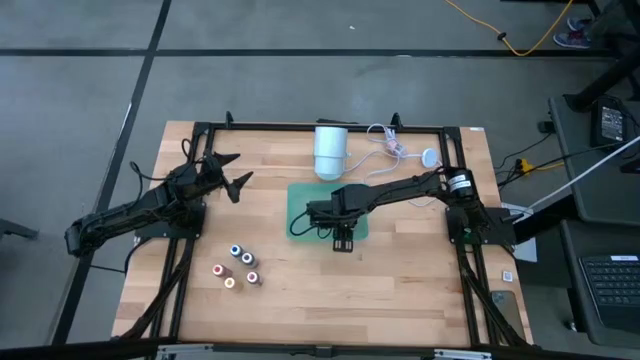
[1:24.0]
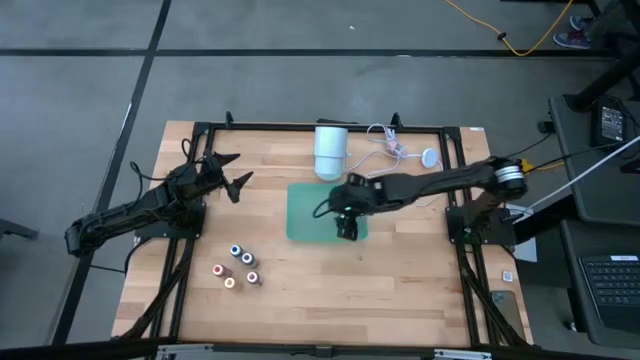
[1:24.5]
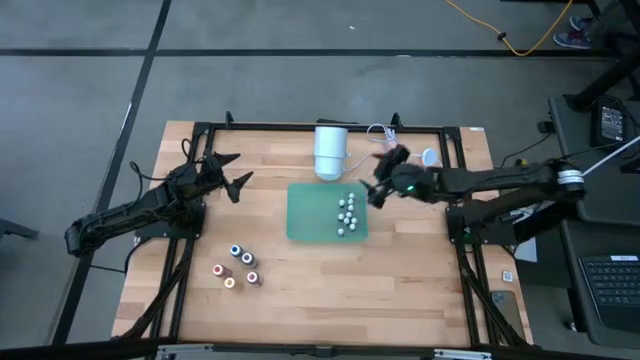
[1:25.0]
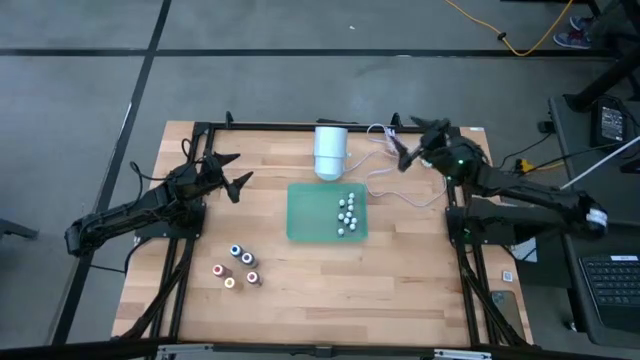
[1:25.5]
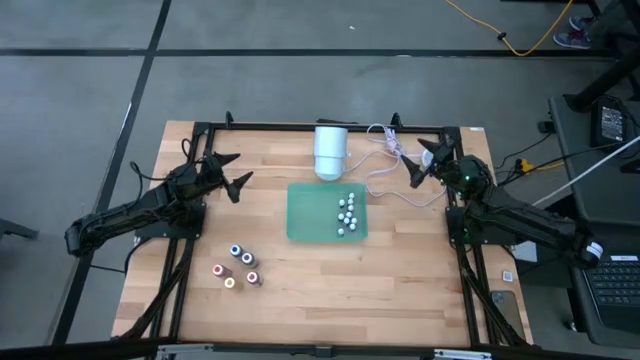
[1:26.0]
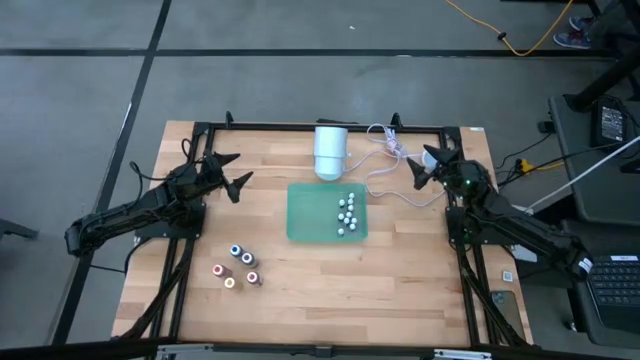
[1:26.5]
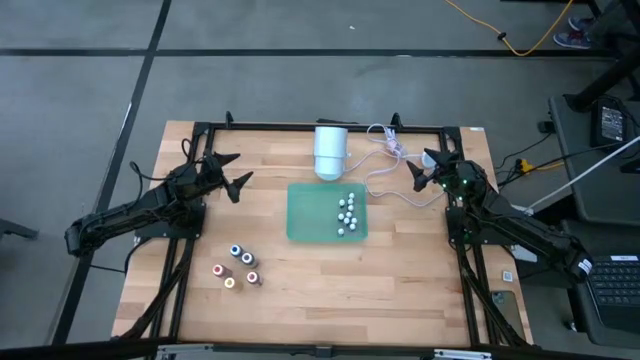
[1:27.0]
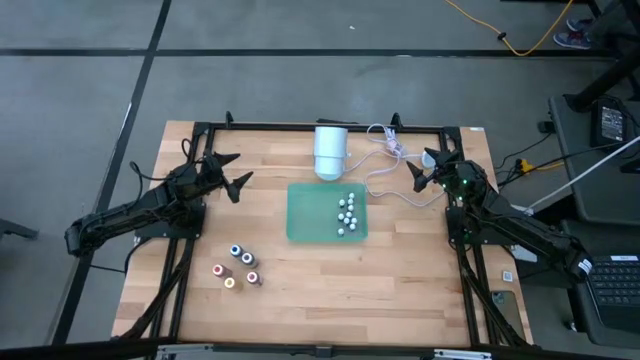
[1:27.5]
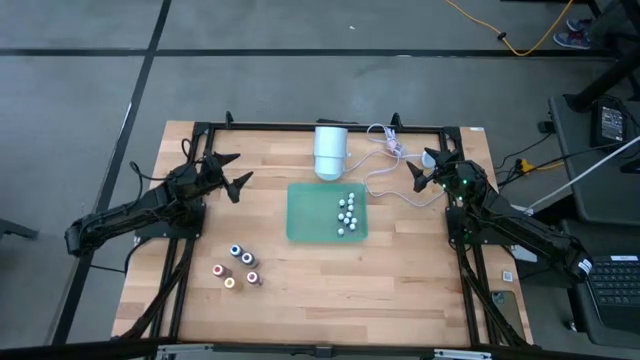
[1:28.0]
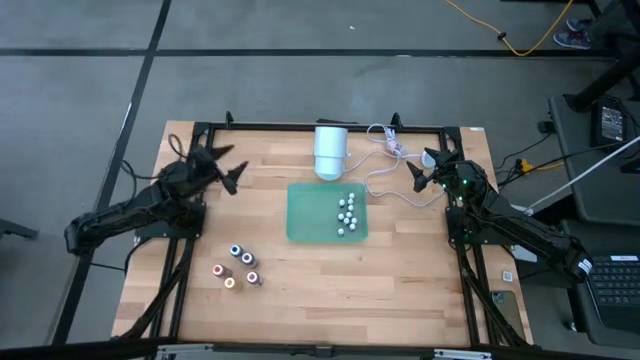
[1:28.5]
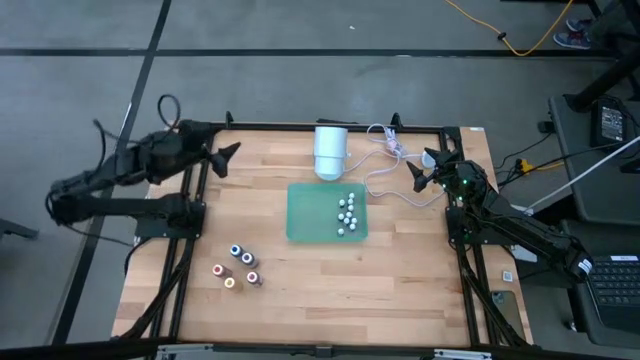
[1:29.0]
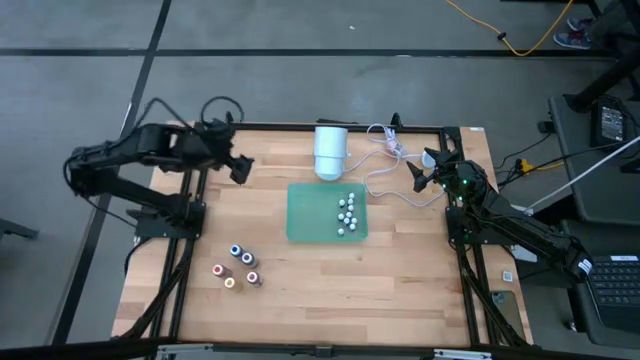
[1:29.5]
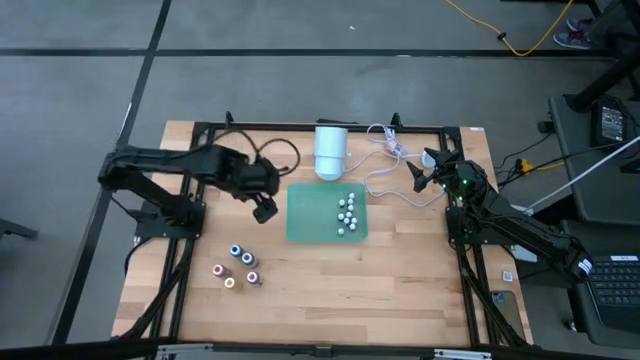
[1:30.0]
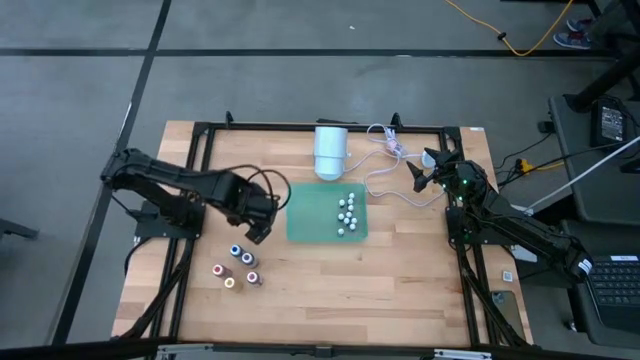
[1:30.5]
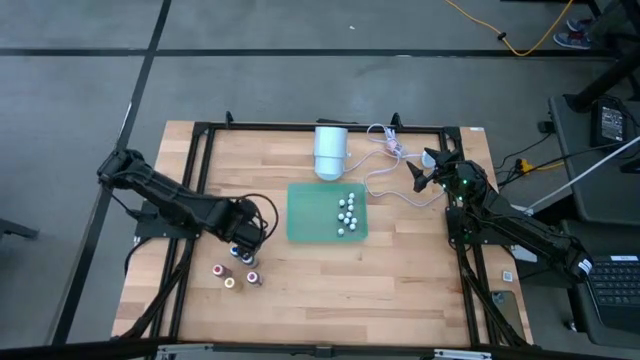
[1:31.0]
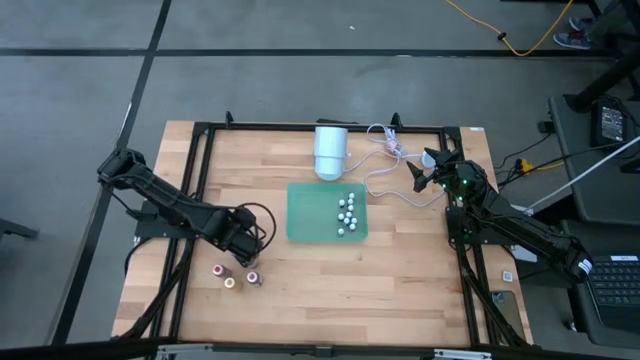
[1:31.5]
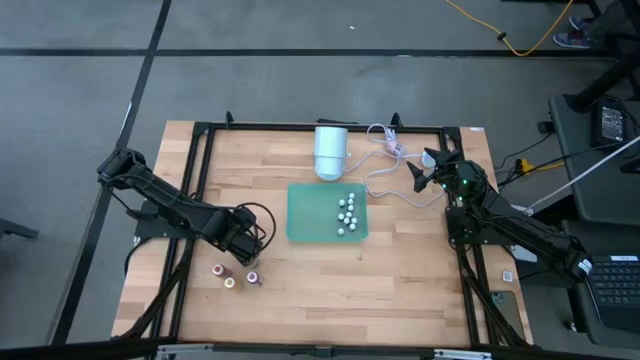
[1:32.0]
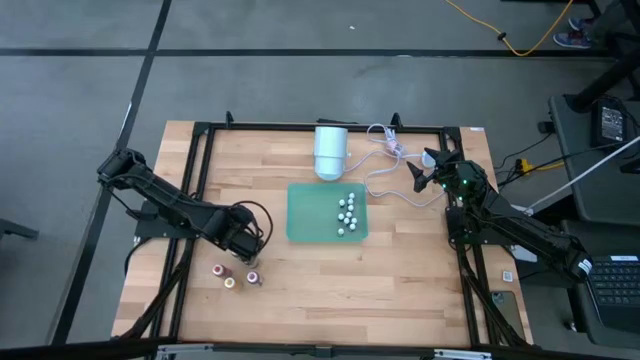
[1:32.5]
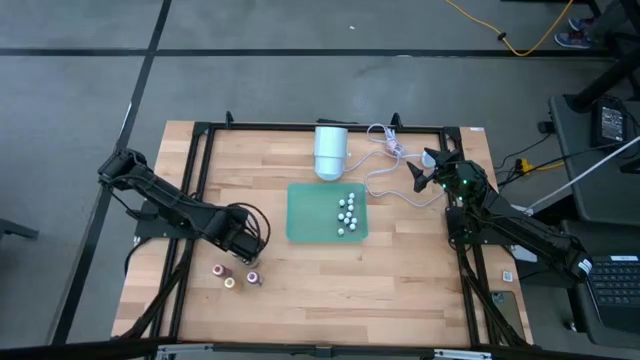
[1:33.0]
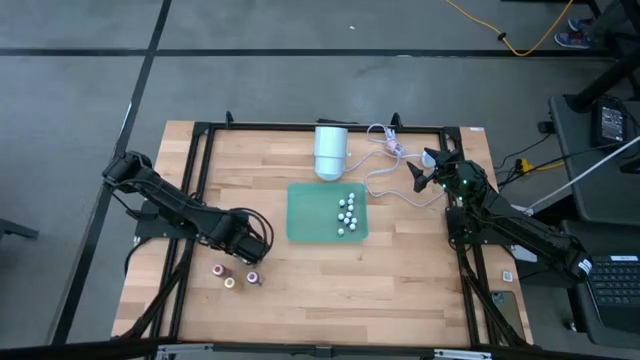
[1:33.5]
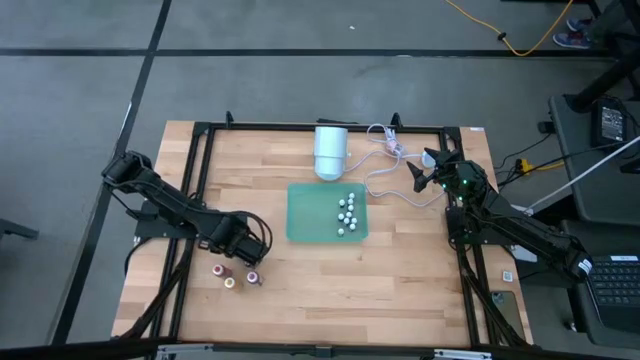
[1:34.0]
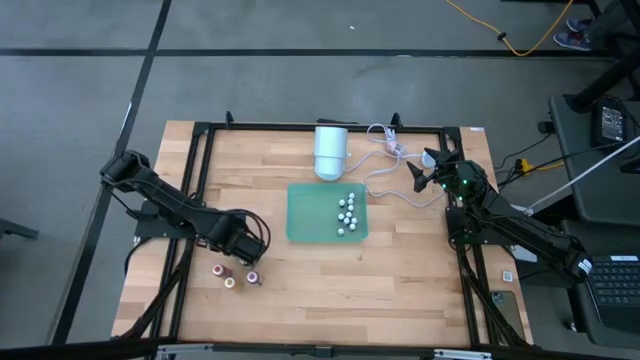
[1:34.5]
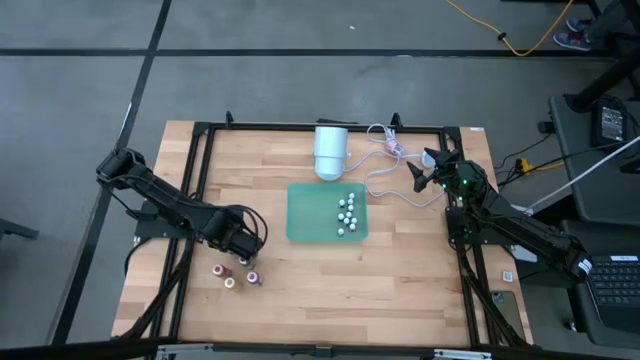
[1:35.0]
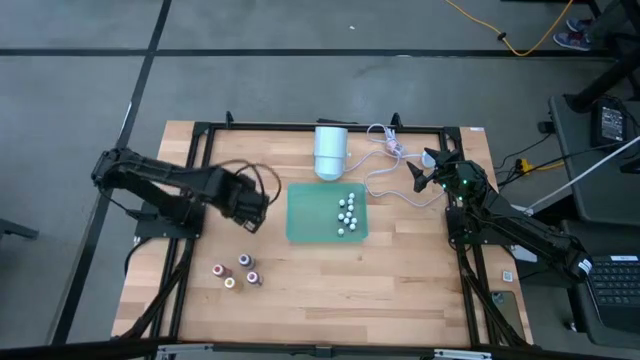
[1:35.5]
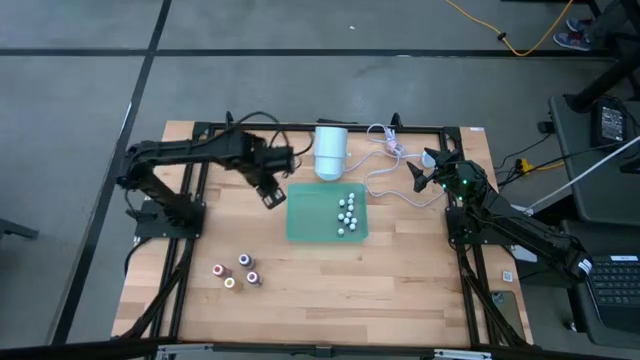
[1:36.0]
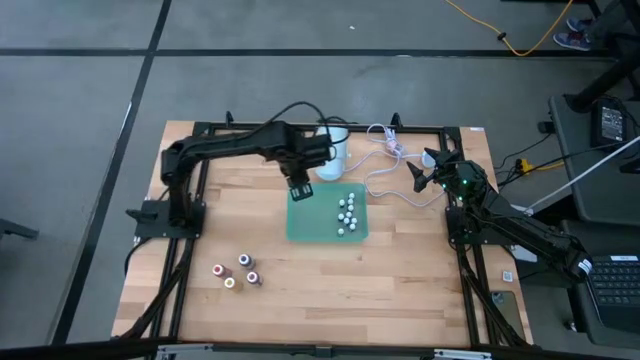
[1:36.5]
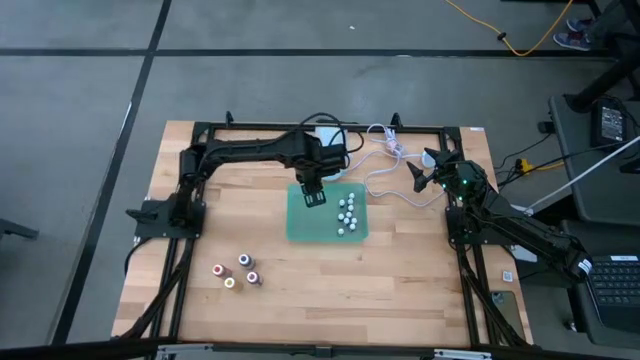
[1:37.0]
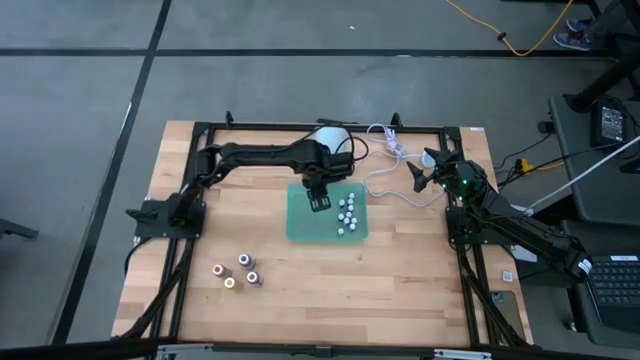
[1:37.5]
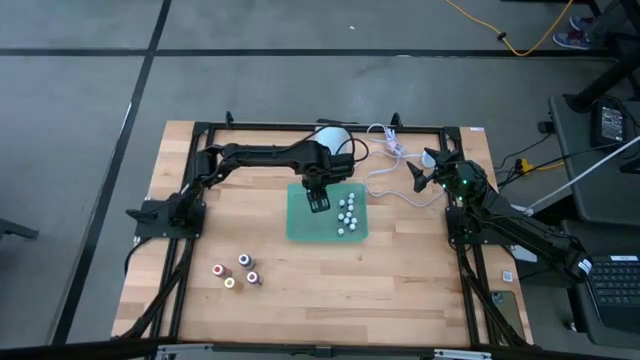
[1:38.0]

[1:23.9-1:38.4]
Task: Pick & Place food coloring
Put the large blue food coloring bottle into the green bin

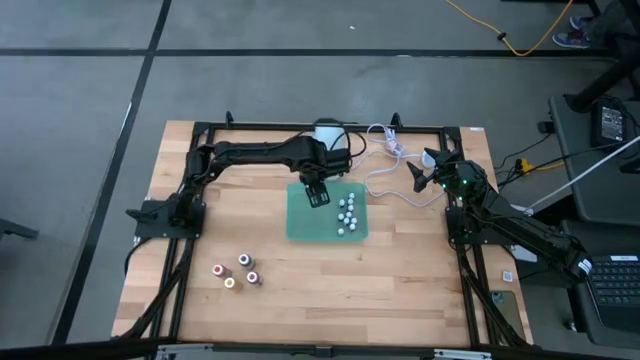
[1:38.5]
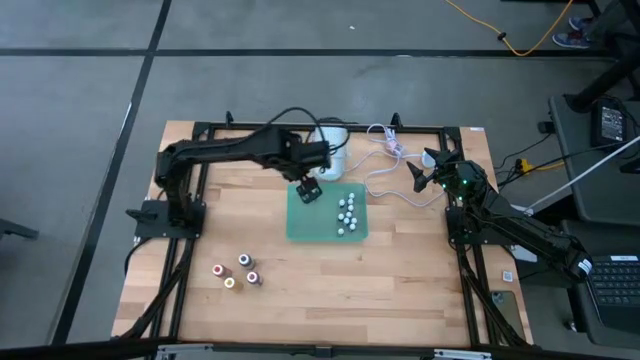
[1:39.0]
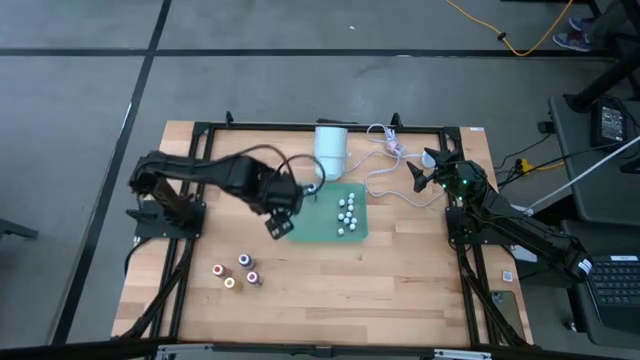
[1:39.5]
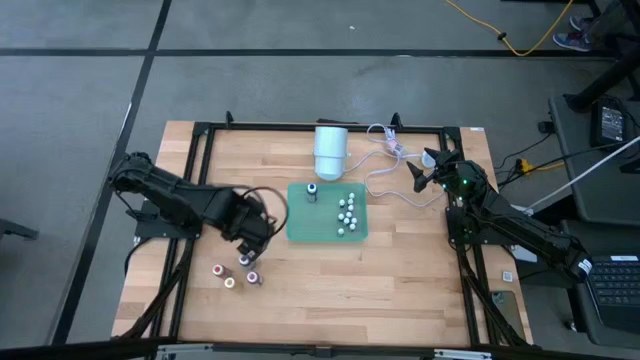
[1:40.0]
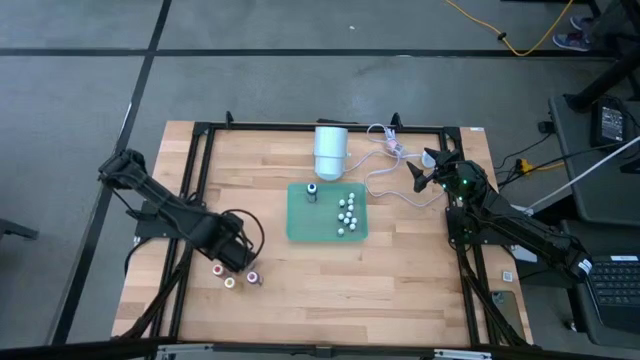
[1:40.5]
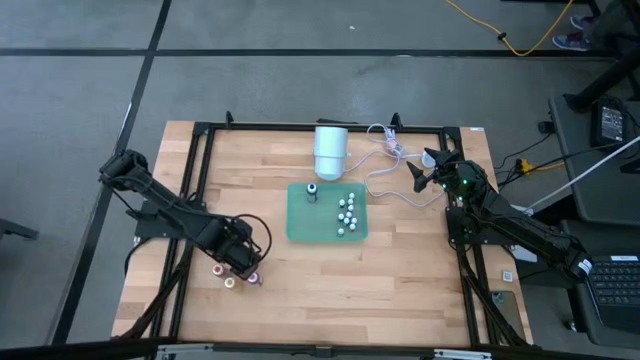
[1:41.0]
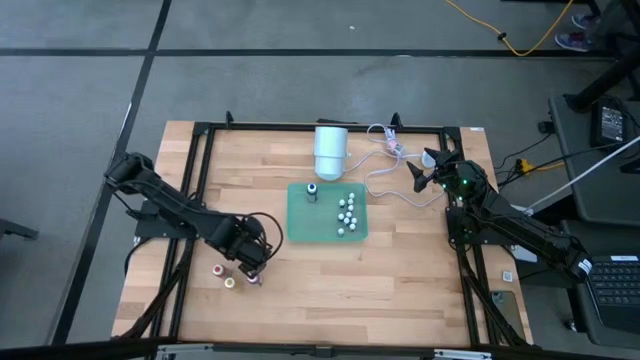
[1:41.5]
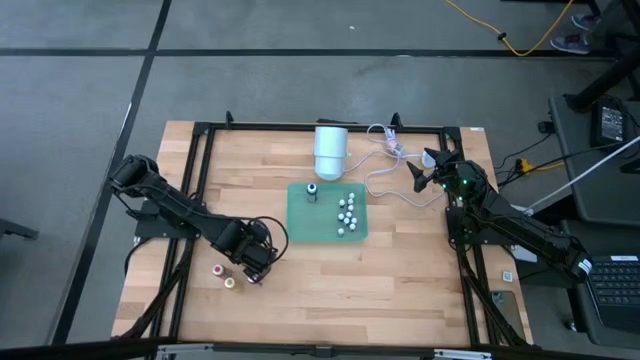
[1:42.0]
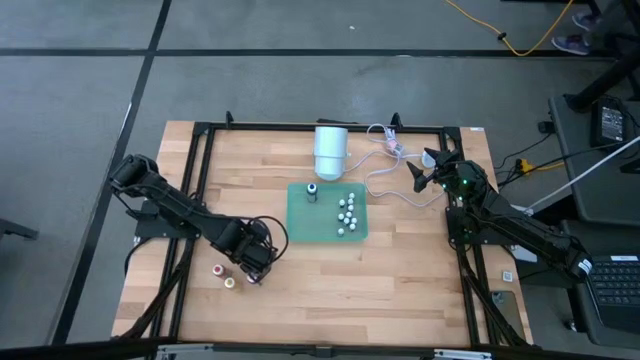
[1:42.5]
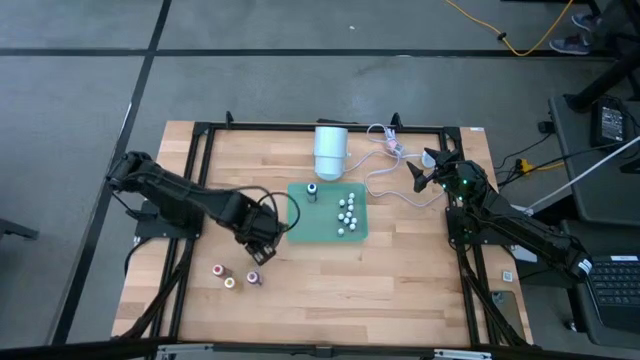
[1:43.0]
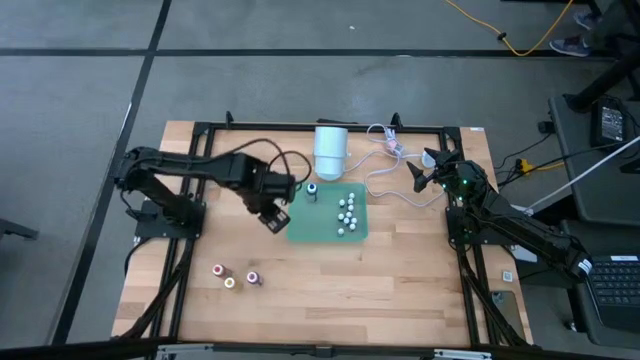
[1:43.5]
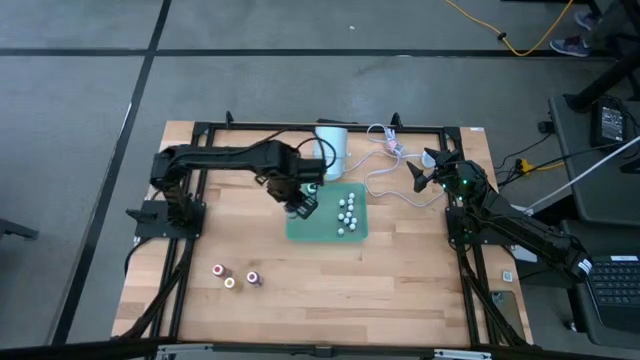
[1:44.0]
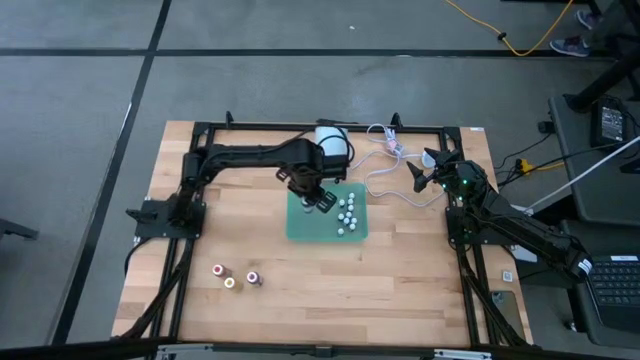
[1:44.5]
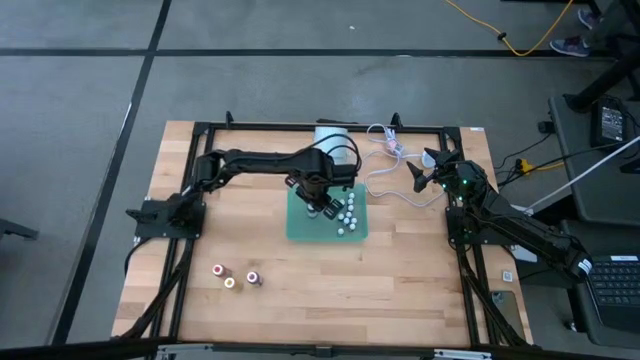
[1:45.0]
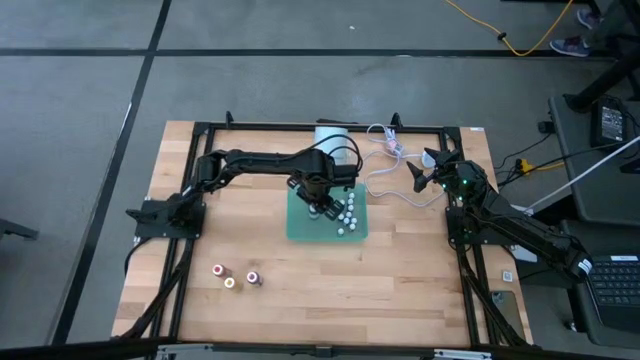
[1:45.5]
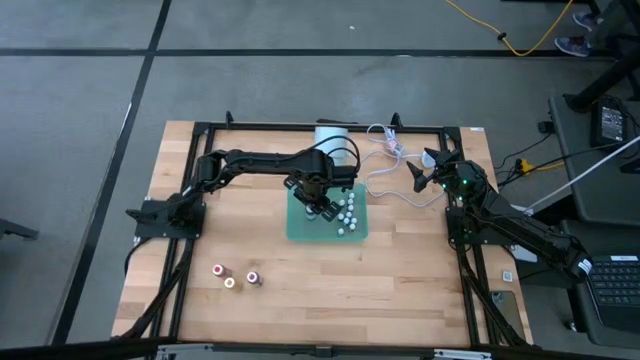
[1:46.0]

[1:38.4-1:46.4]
Put the large purple food coloring bottle into the green bin
